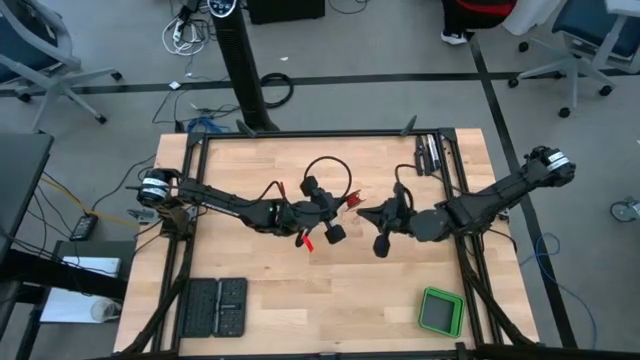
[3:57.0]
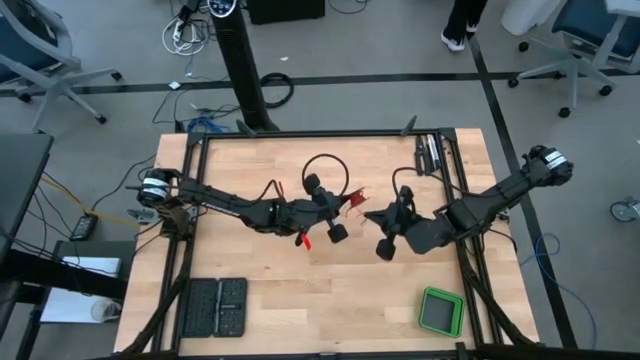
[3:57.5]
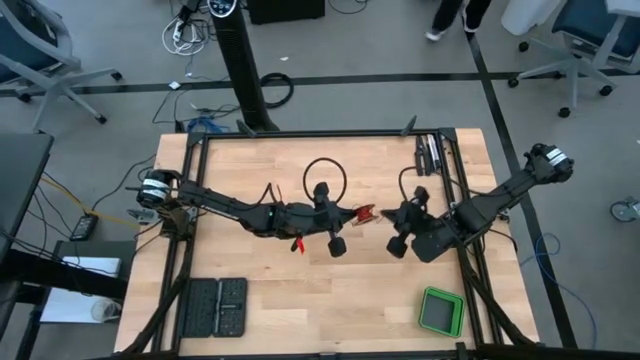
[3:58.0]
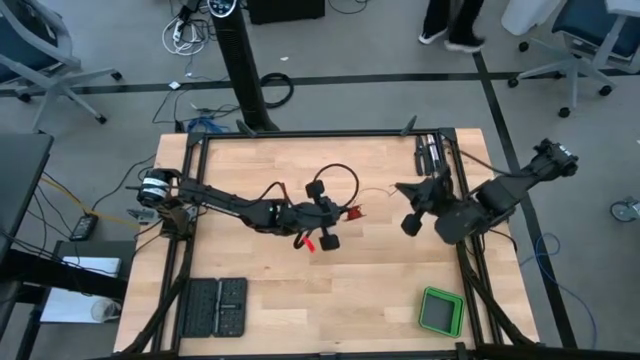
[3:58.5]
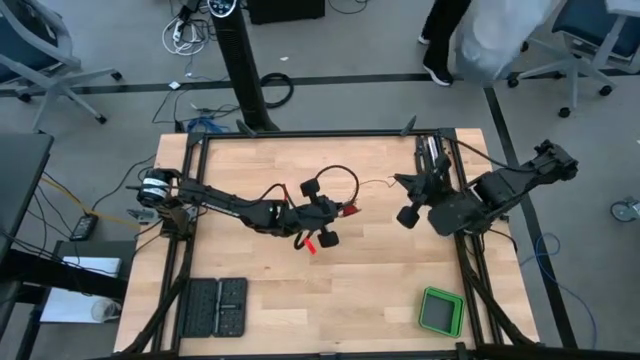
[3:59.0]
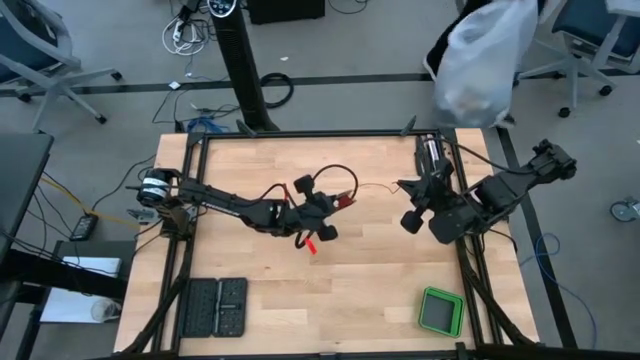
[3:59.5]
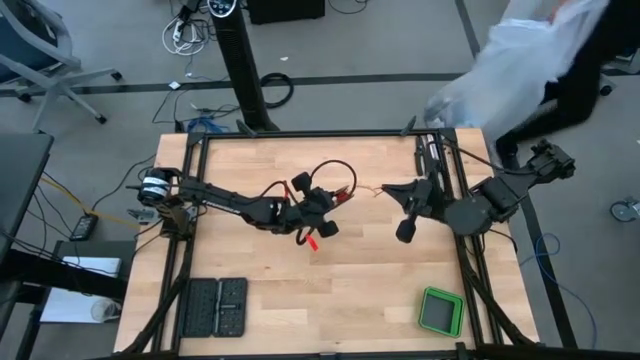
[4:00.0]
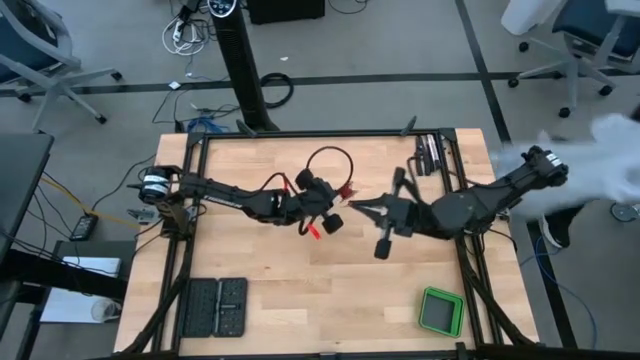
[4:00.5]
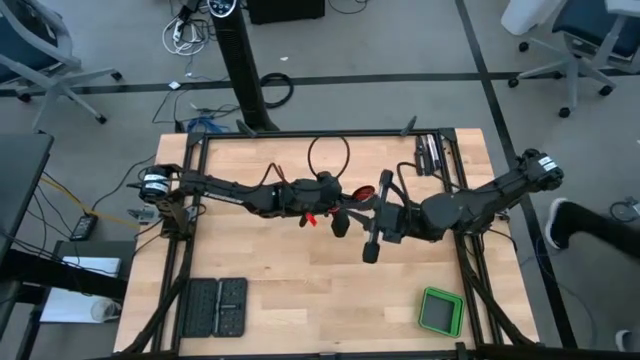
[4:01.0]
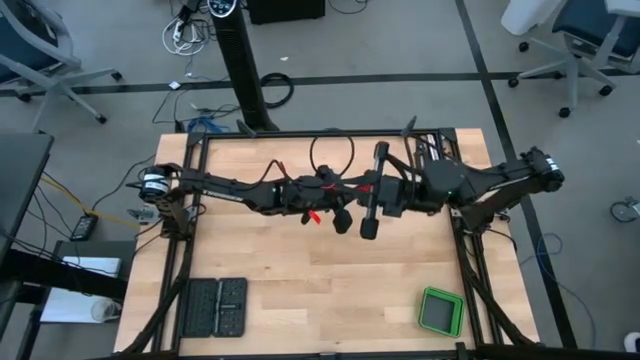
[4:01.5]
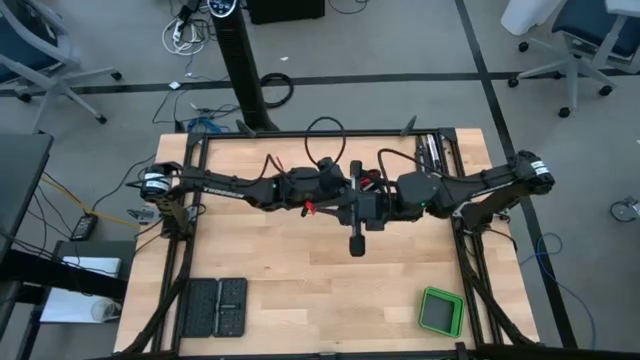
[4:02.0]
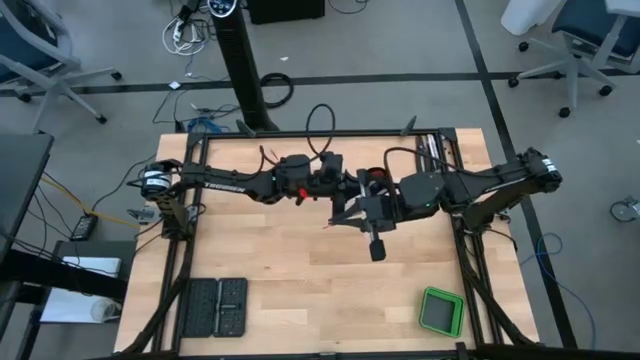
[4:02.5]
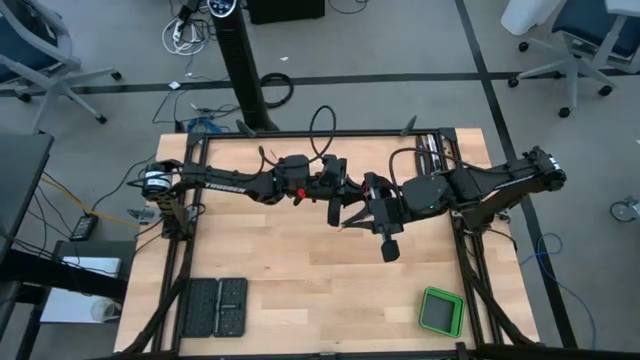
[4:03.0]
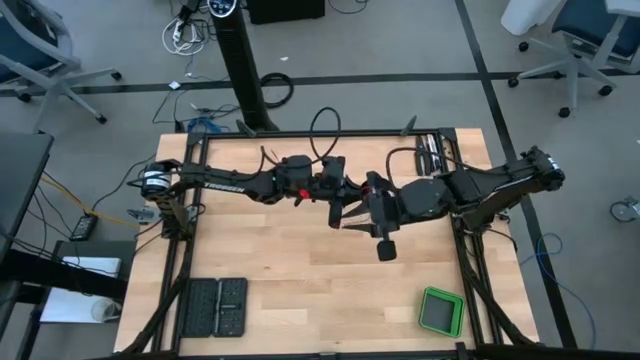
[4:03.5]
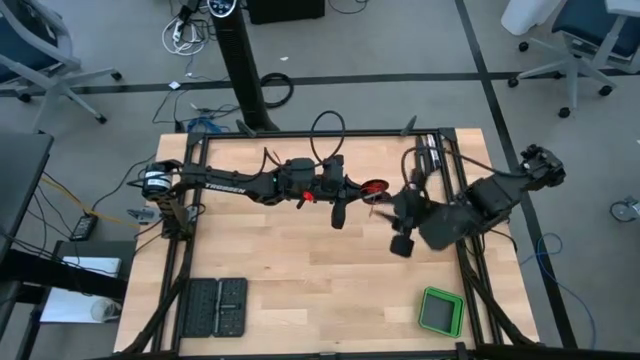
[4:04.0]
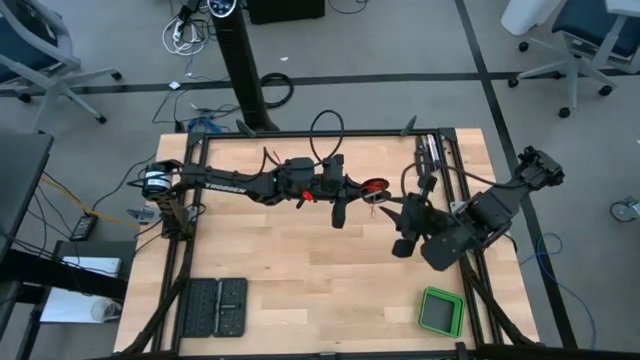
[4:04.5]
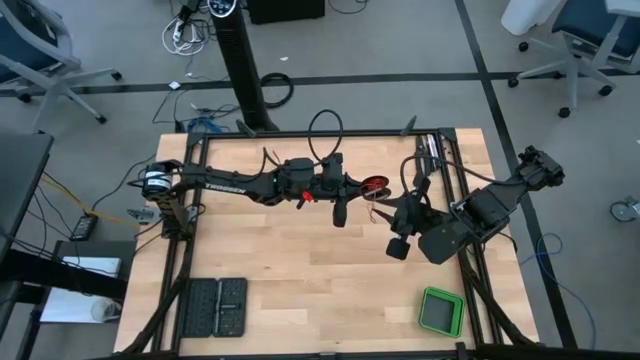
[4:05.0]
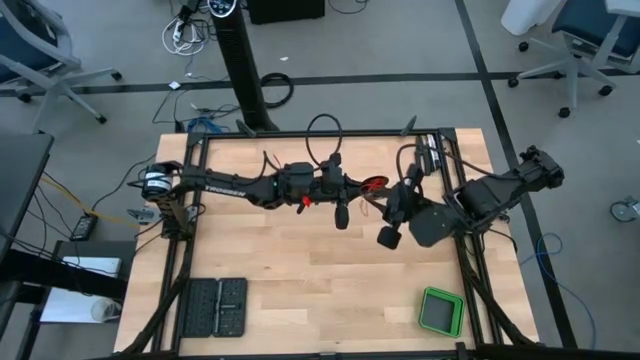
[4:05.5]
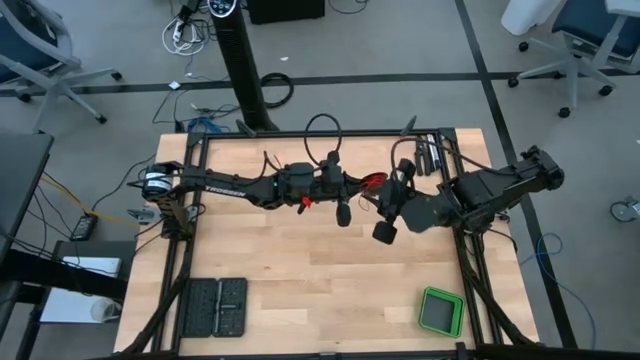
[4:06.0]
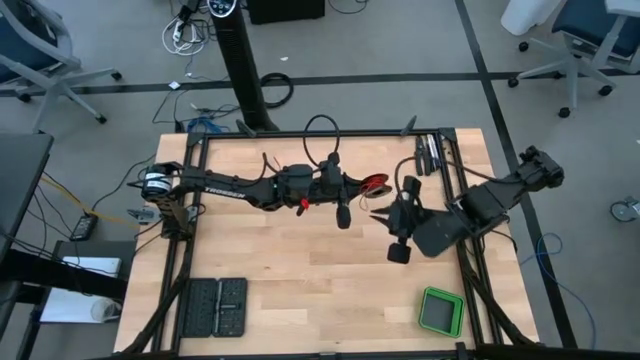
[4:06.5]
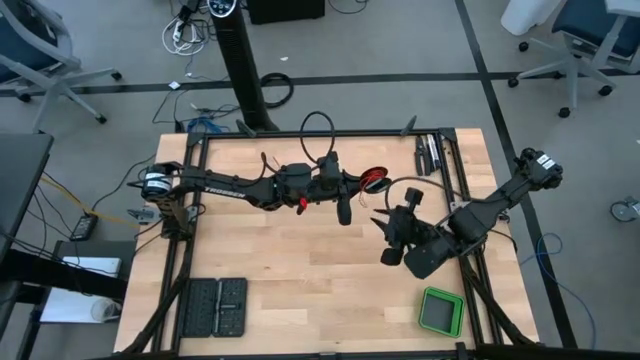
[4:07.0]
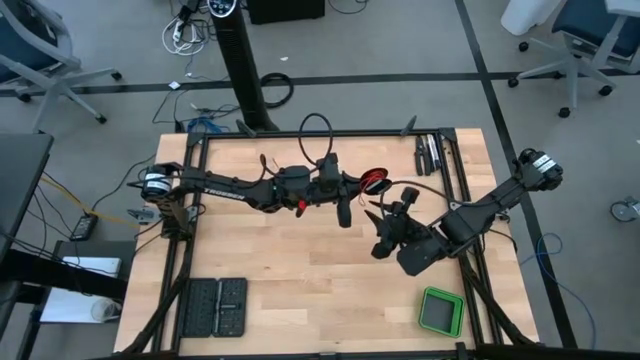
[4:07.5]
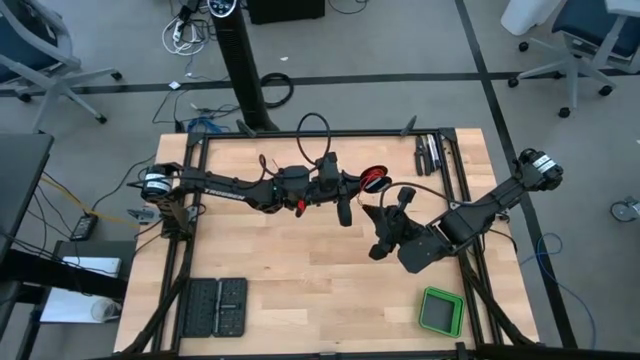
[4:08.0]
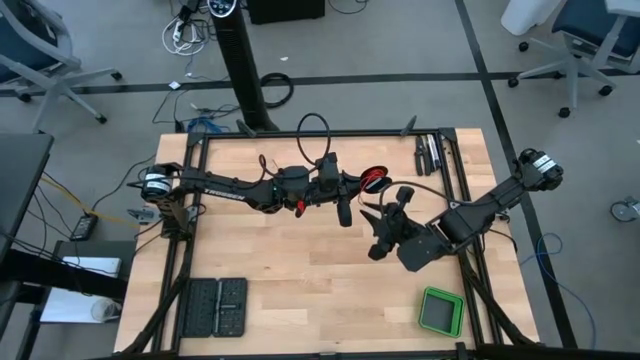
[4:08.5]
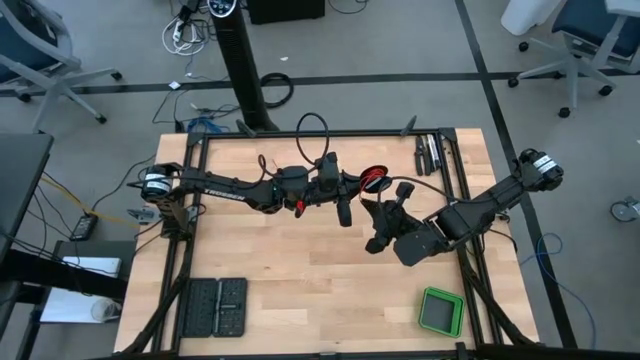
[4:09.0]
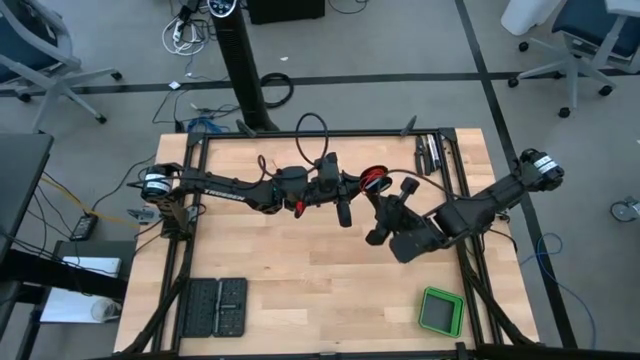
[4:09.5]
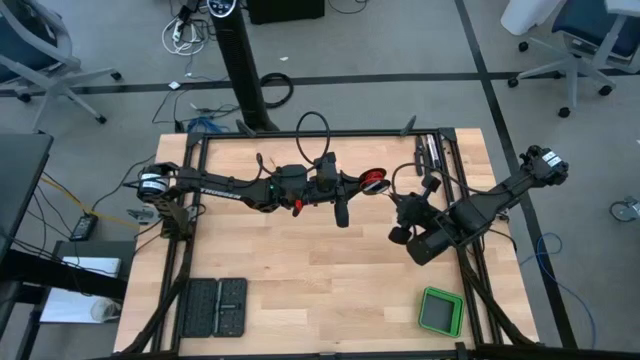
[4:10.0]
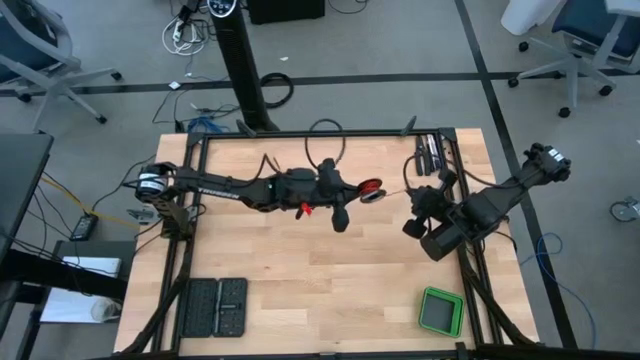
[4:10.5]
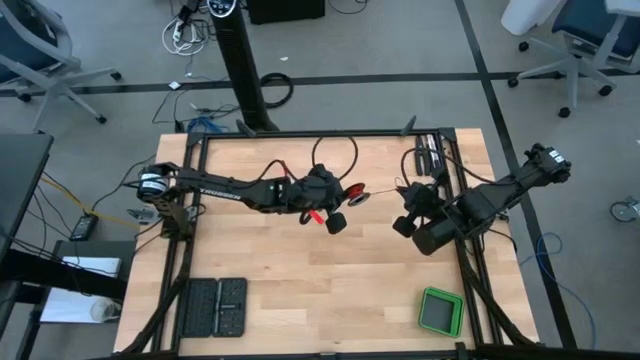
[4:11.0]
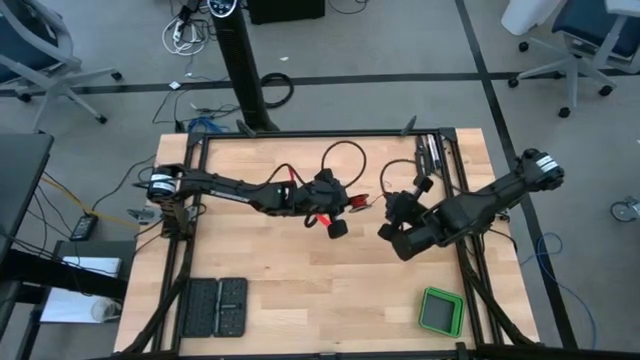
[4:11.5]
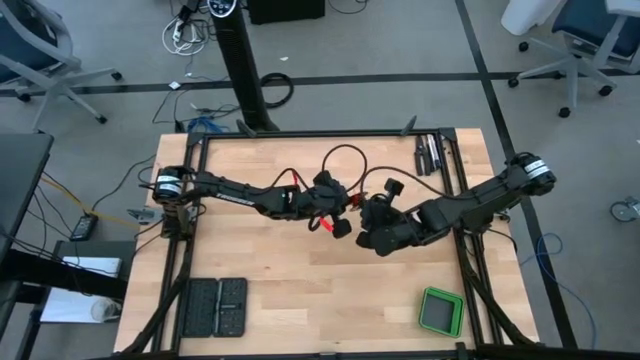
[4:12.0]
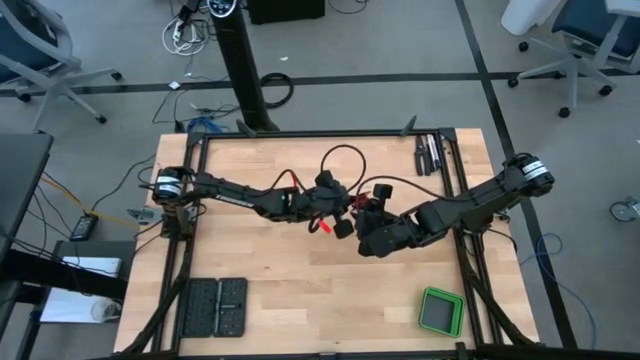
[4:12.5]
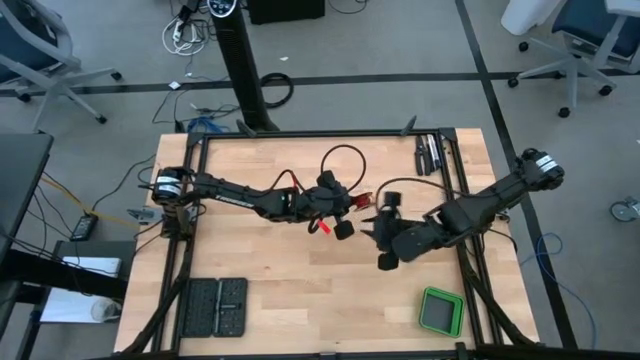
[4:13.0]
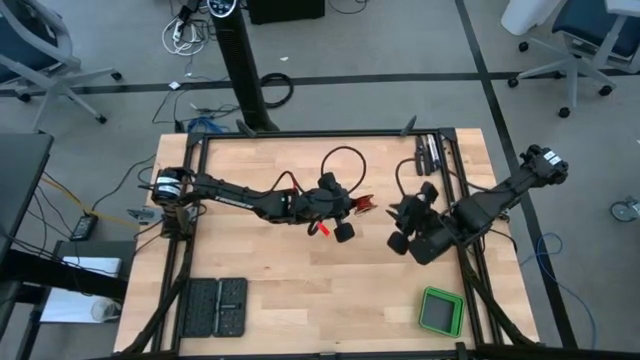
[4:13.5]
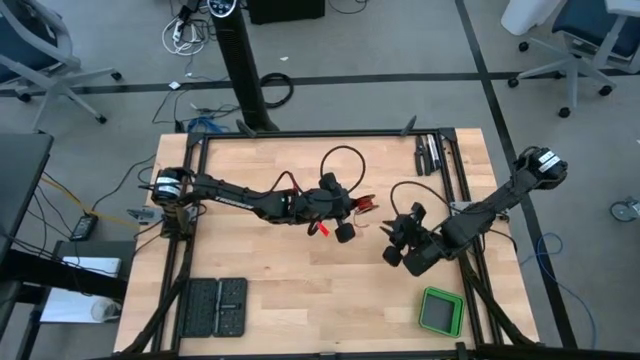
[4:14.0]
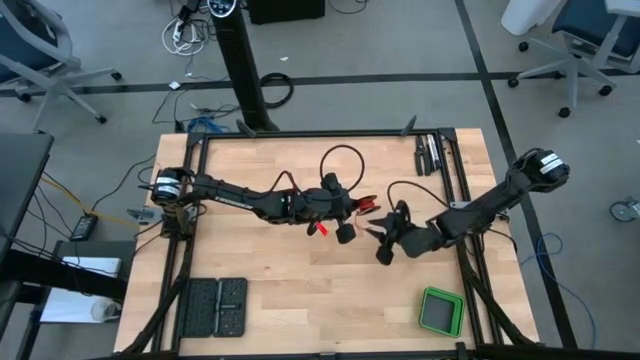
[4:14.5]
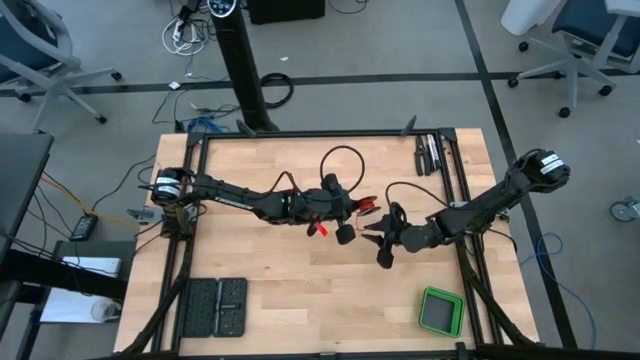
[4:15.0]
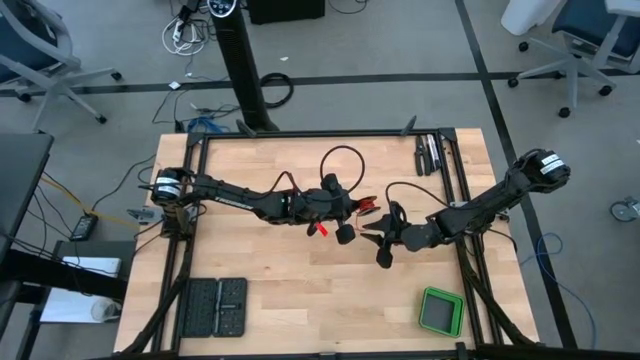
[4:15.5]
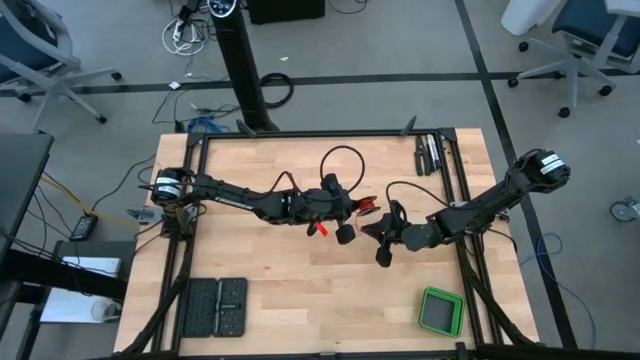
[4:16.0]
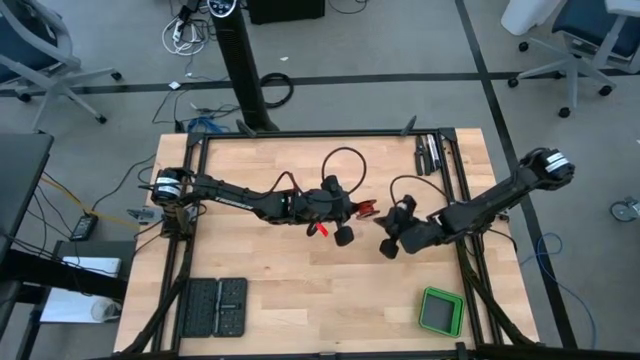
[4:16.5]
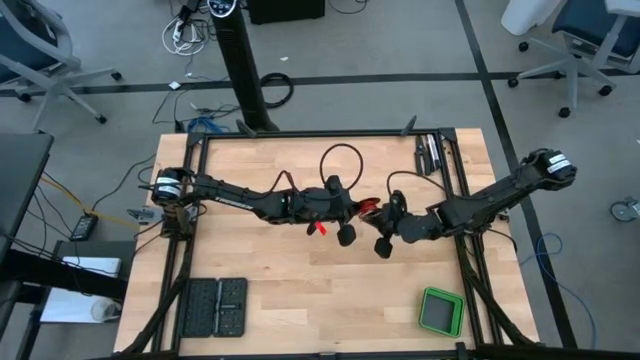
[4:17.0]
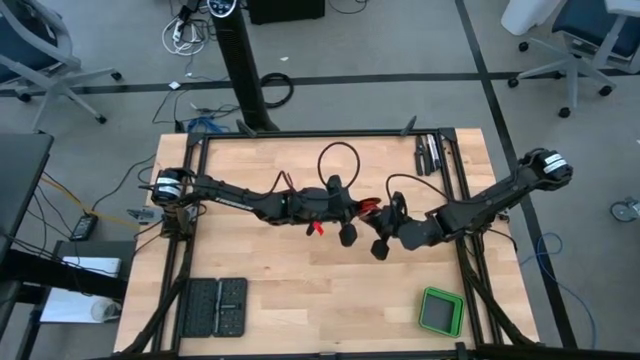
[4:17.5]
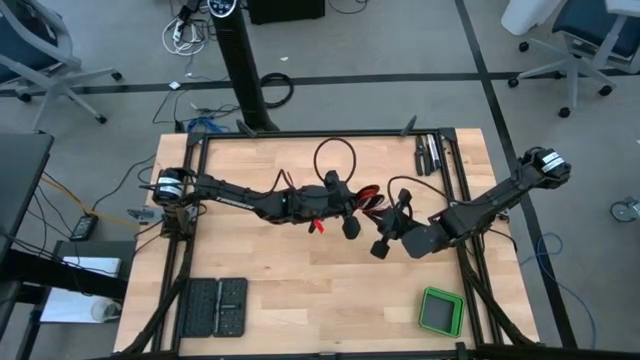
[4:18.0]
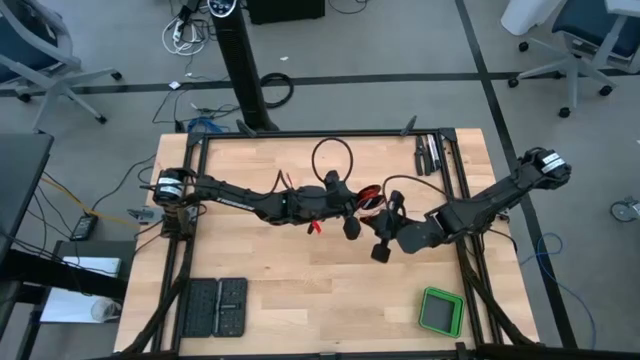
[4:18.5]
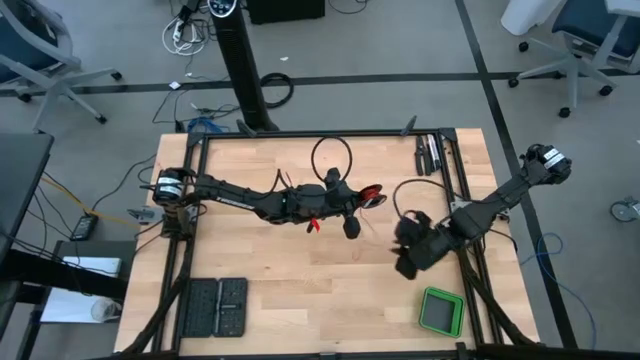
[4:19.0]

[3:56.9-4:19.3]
Task: Coil cords
Coil the red wire cable onto the black spool
